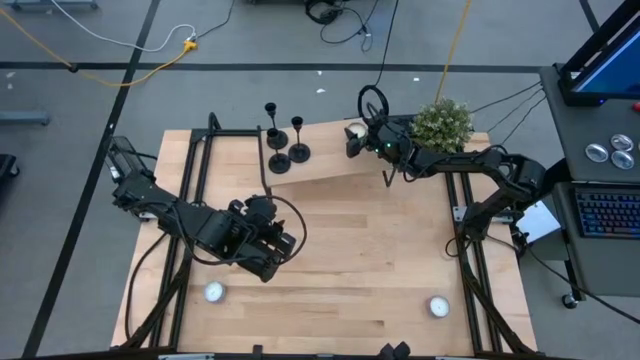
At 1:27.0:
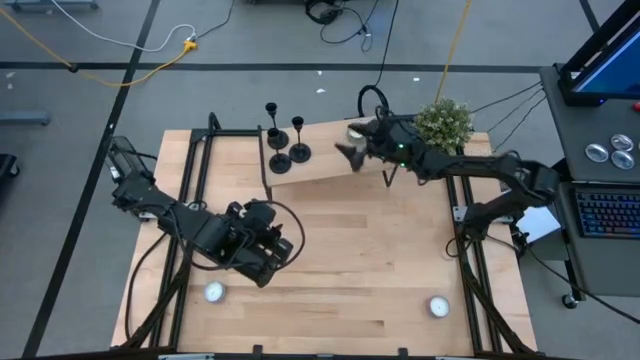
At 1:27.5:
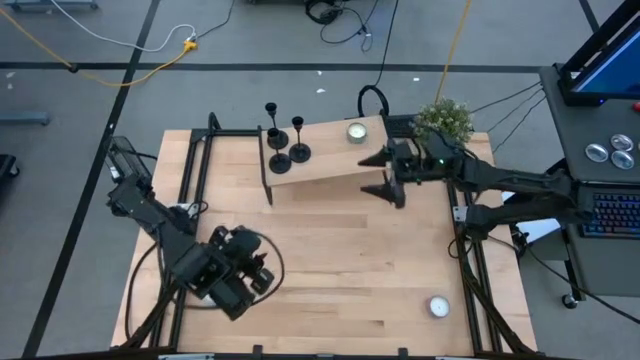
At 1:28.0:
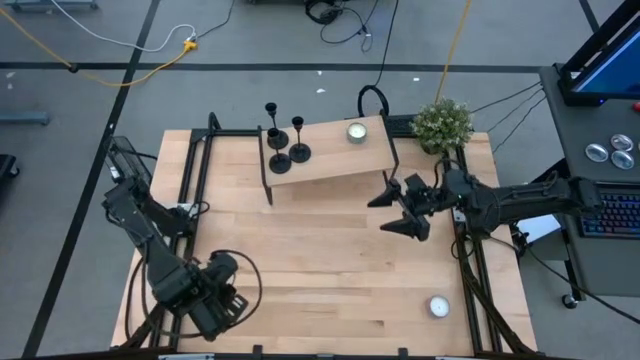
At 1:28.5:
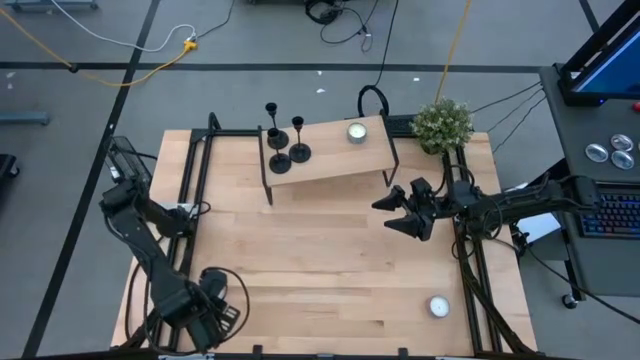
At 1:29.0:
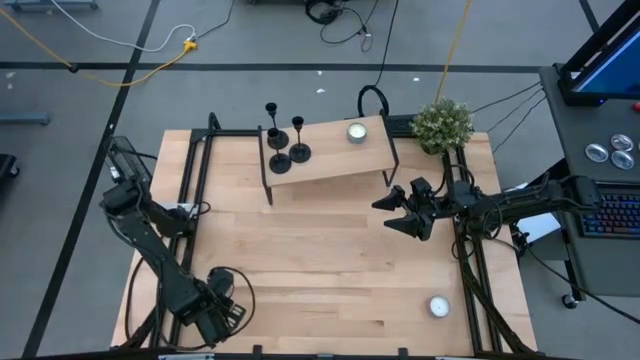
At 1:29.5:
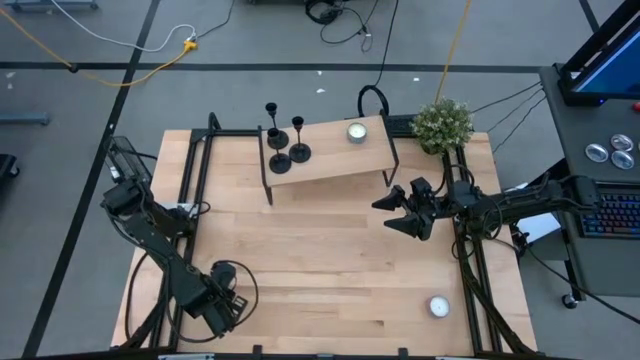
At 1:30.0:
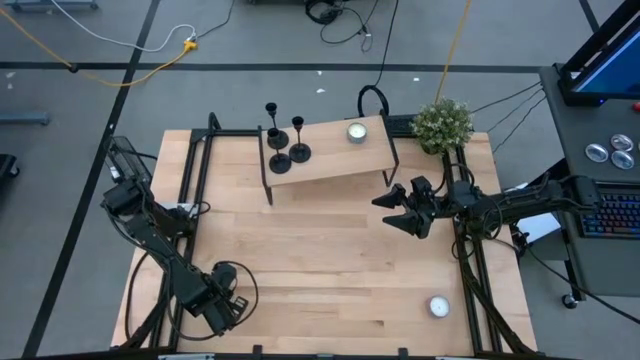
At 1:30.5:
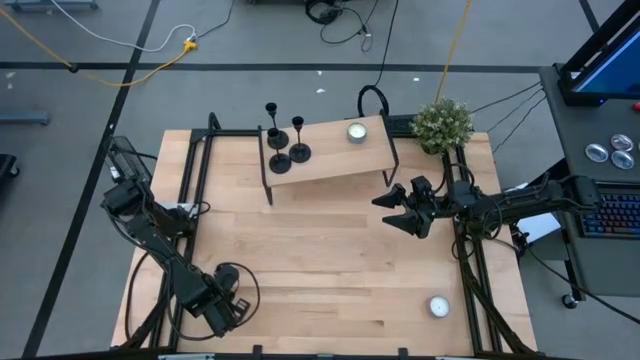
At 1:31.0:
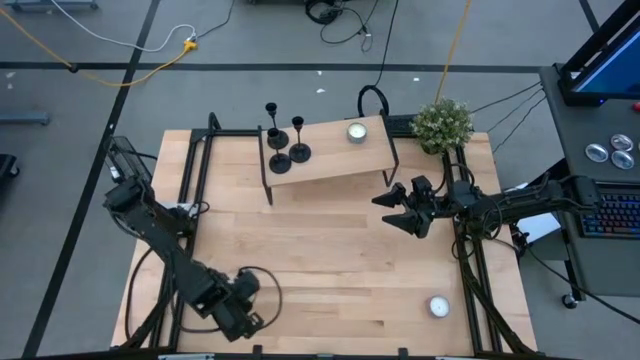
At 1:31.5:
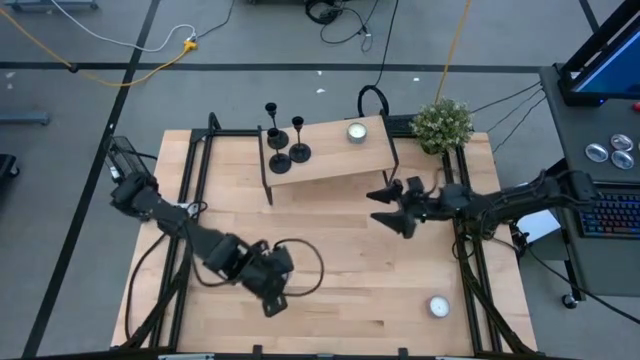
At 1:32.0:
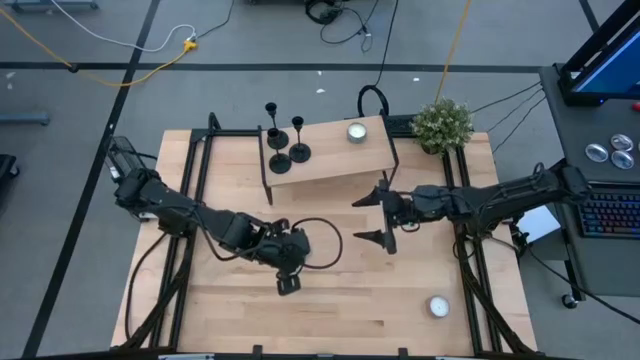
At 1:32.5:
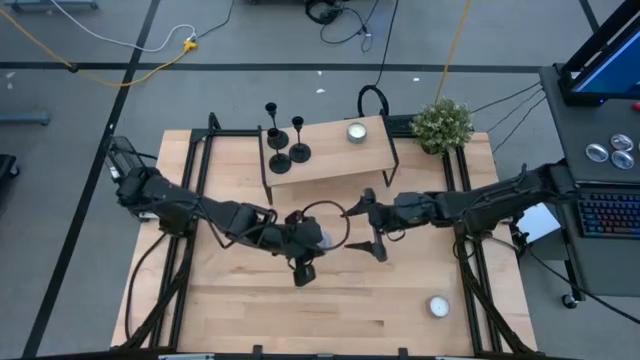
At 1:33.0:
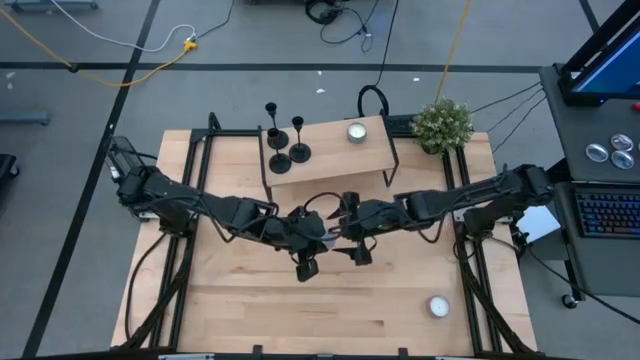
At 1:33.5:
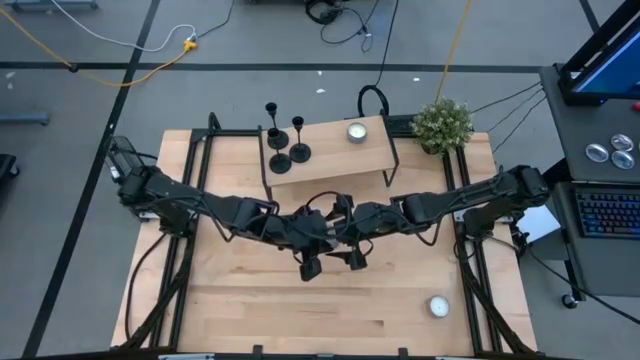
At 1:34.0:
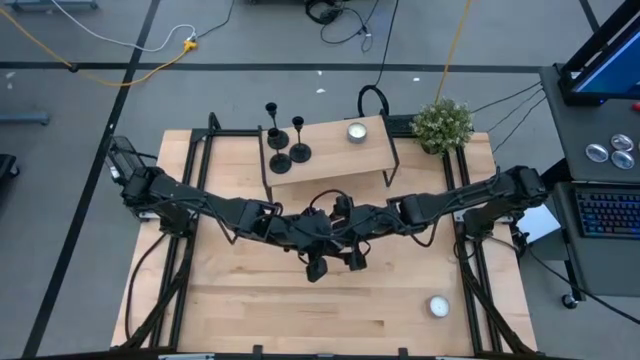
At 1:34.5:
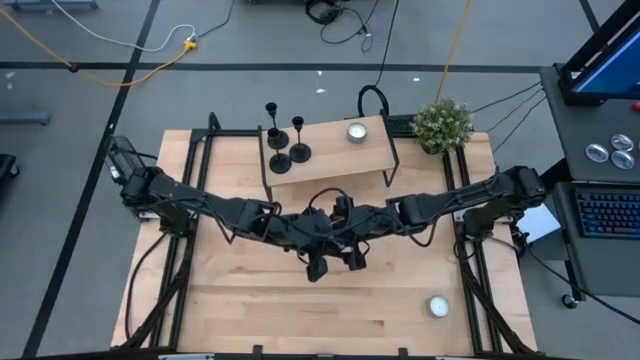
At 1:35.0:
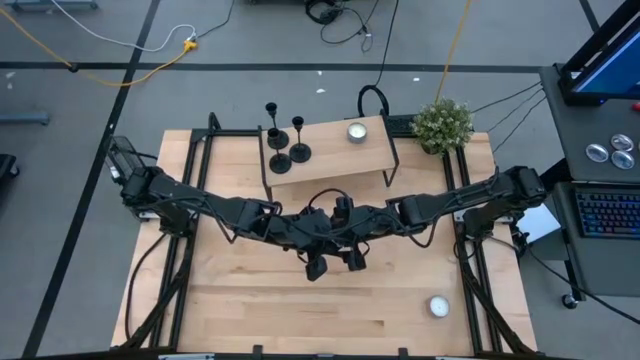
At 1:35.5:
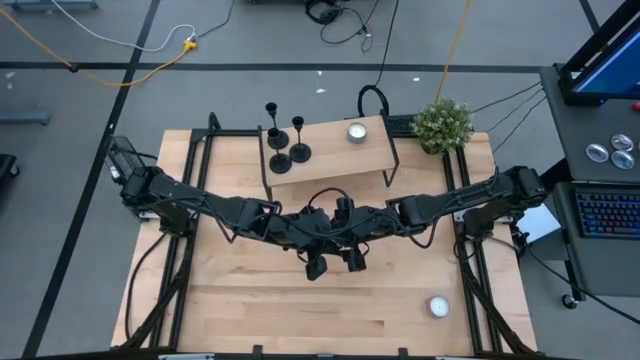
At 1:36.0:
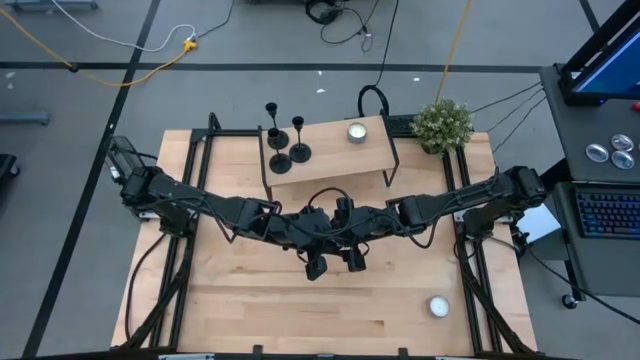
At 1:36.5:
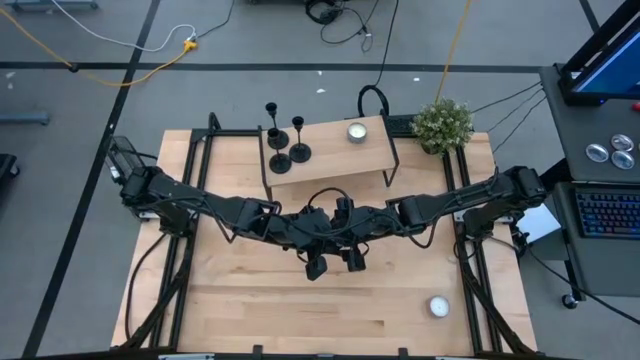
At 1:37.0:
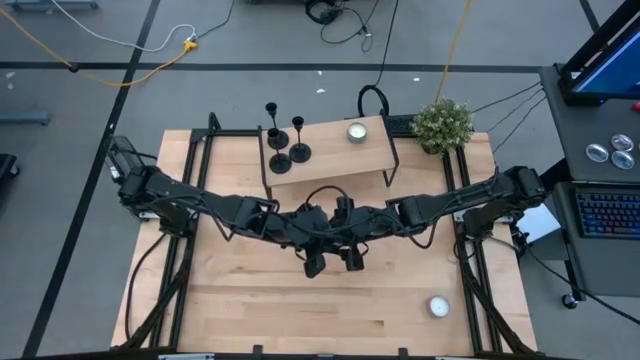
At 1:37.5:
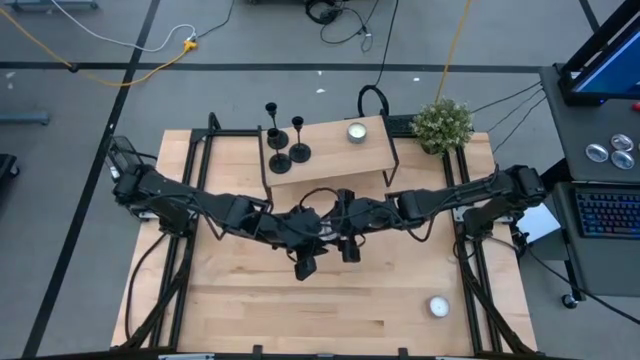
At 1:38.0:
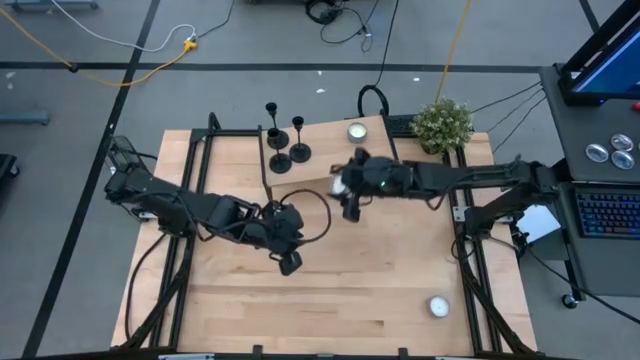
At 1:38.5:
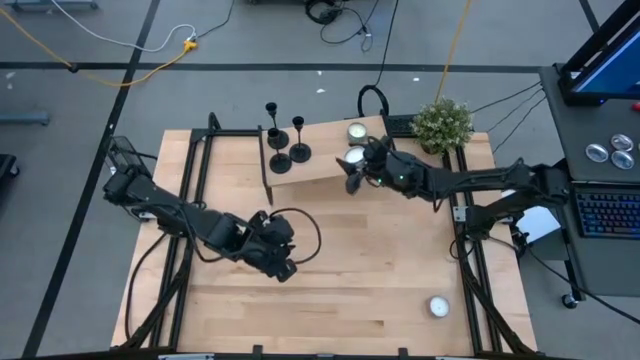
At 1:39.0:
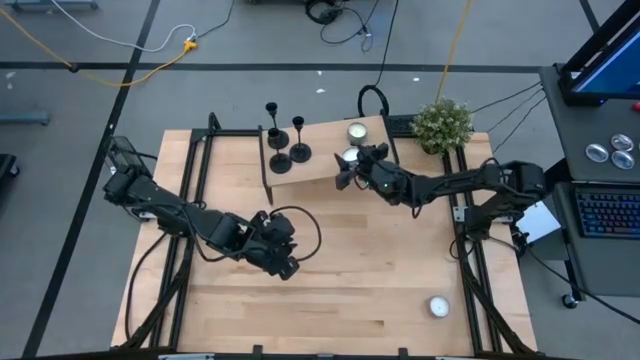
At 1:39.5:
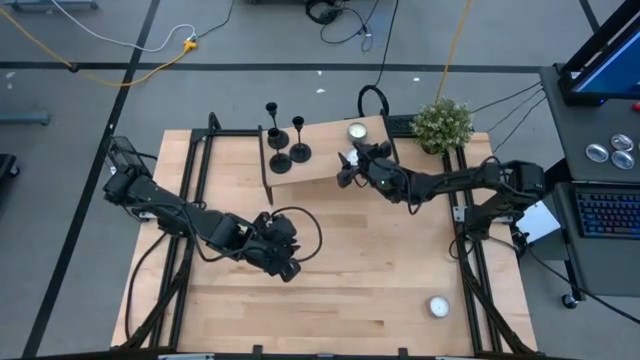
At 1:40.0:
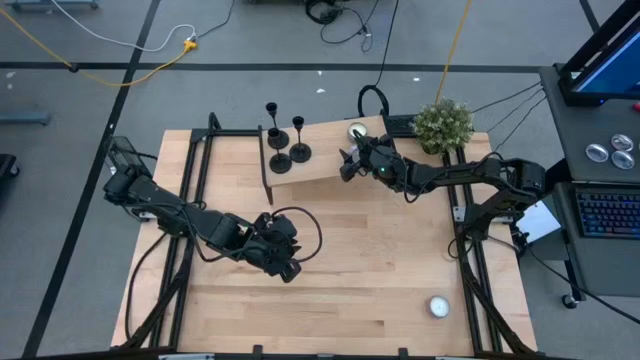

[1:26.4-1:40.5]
Task: Pick & Place candle stick holders
Put the left red and white scented candle on the shelf

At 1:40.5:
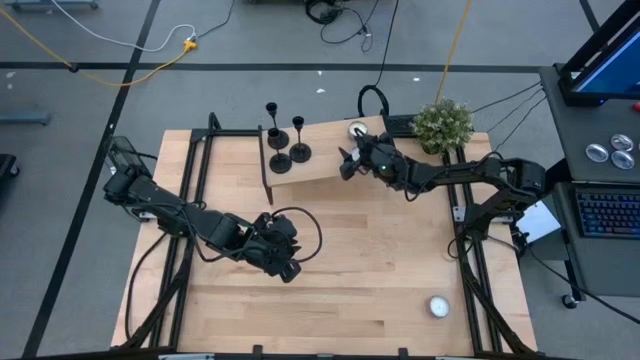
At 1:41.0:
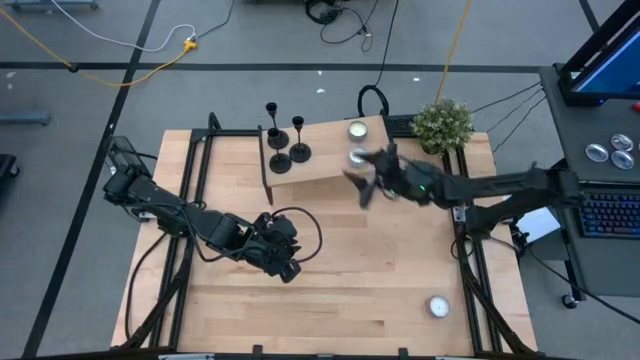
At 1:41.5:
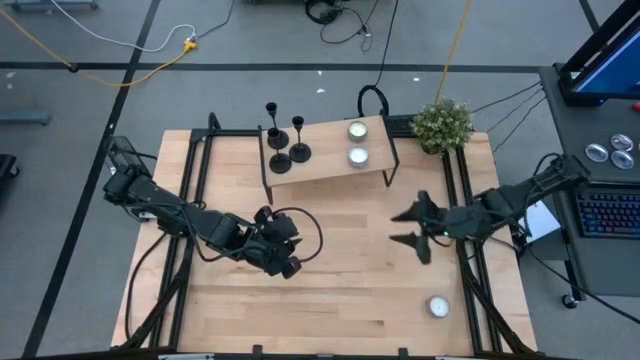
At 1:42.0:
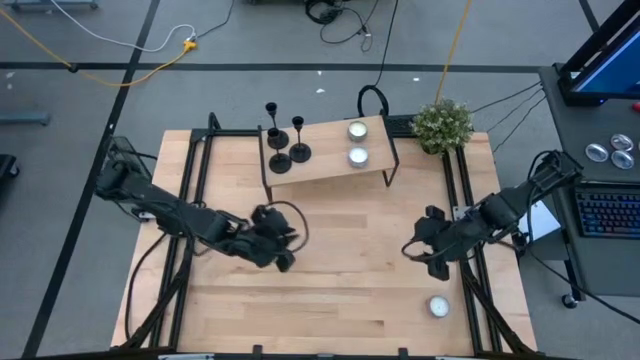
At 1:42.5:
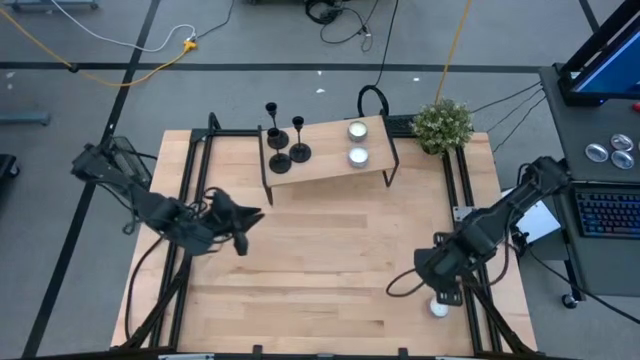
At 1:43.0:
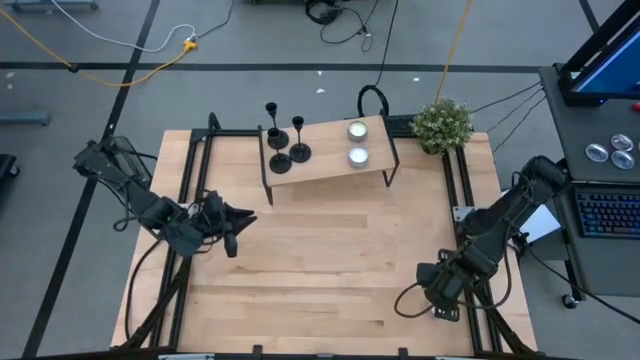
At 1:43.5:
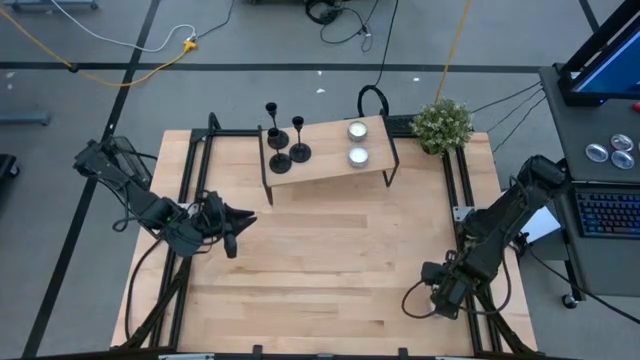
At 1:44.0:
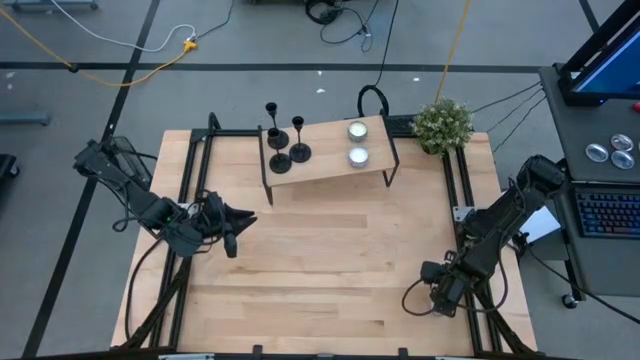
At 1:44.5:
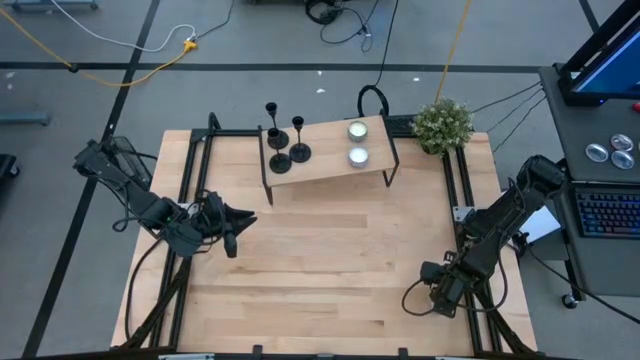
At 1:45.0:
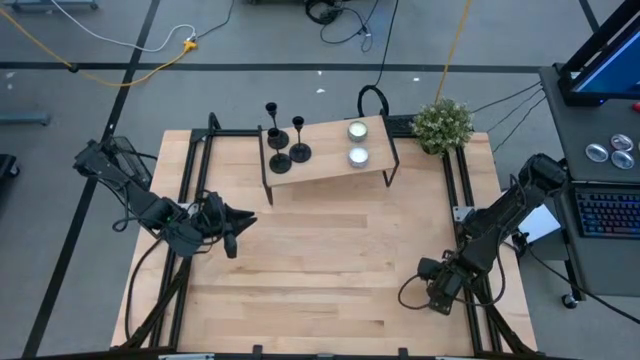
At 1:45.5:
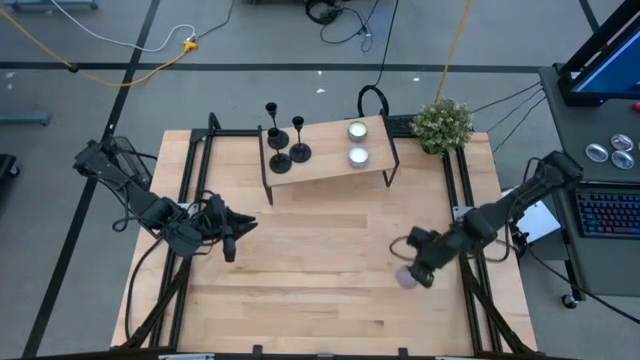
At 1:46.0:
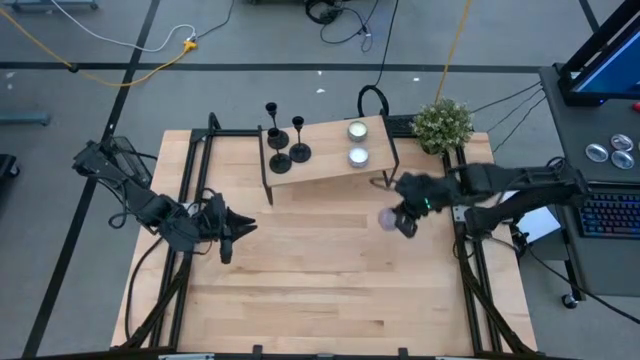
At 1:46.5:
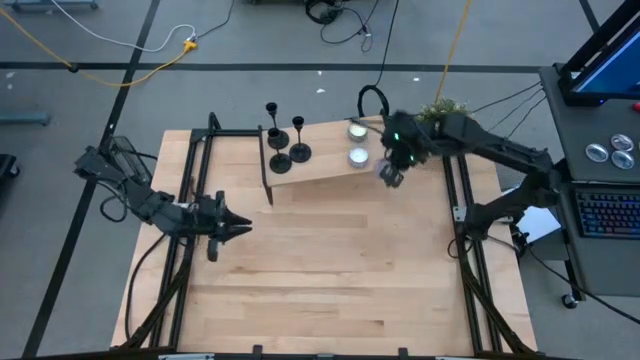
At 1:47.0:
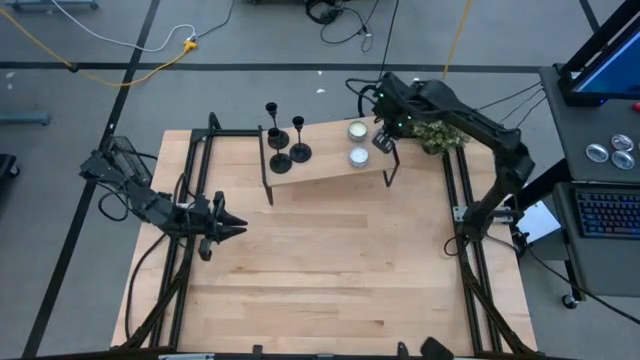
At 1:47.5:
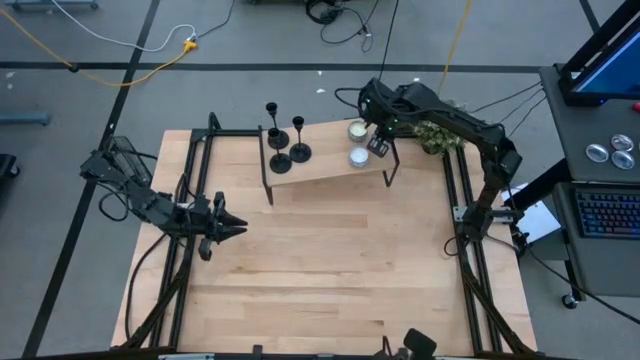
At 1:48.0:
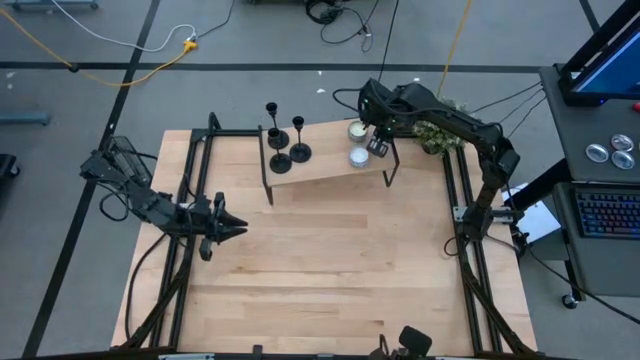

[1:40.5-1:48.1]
Put the pink scented candle on the shelf
